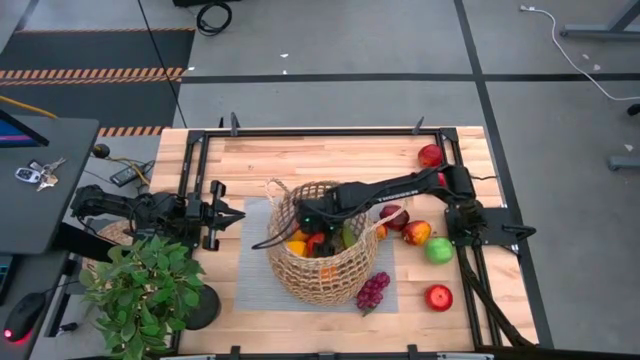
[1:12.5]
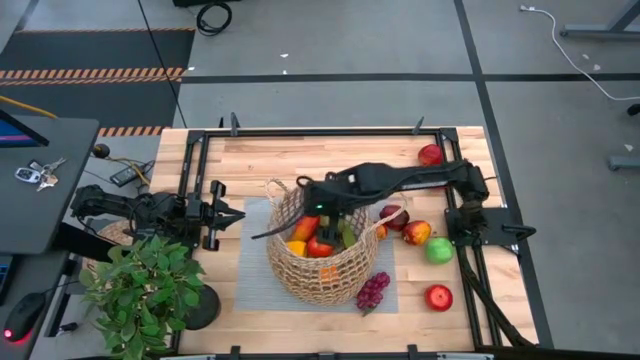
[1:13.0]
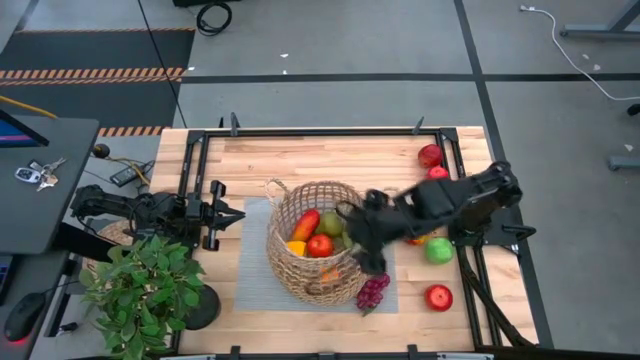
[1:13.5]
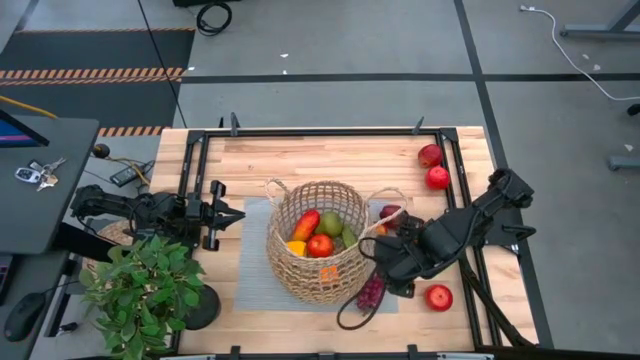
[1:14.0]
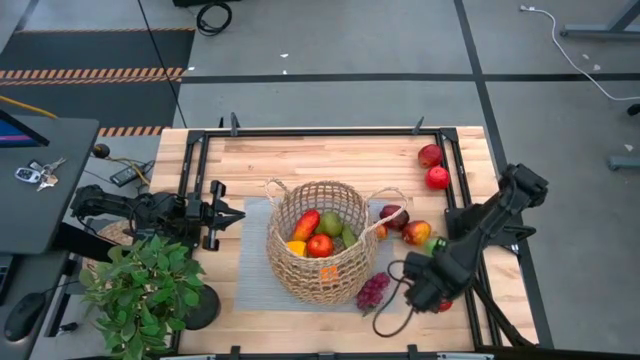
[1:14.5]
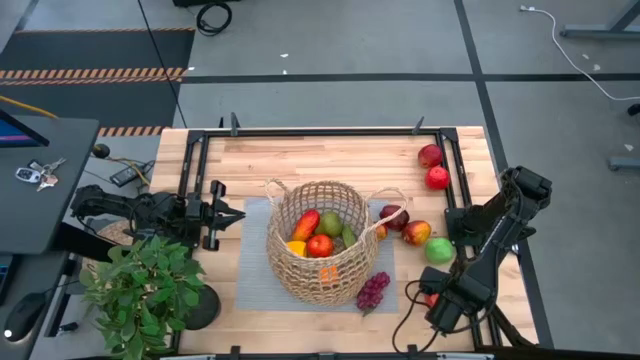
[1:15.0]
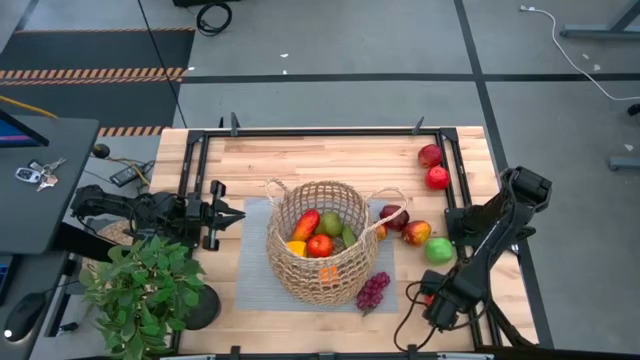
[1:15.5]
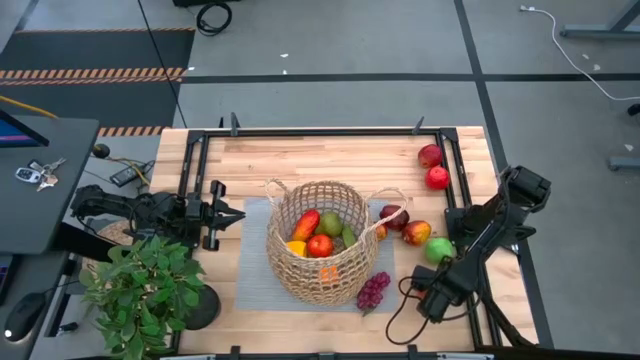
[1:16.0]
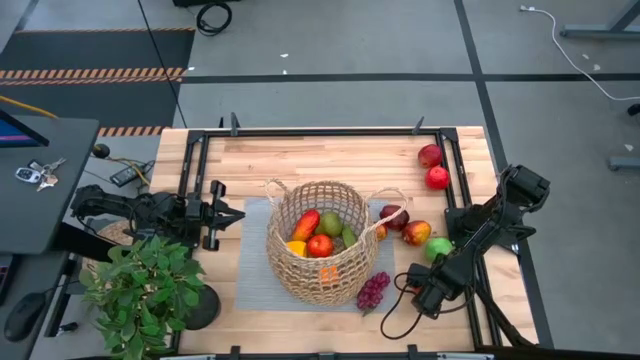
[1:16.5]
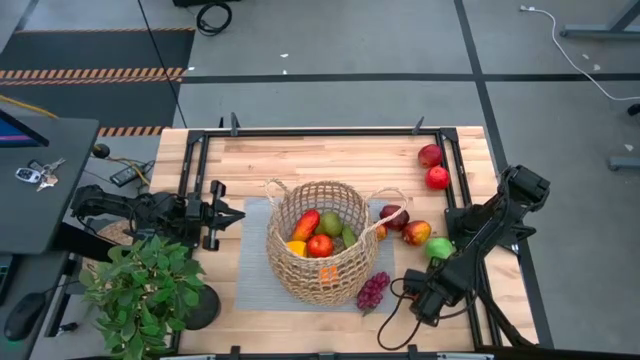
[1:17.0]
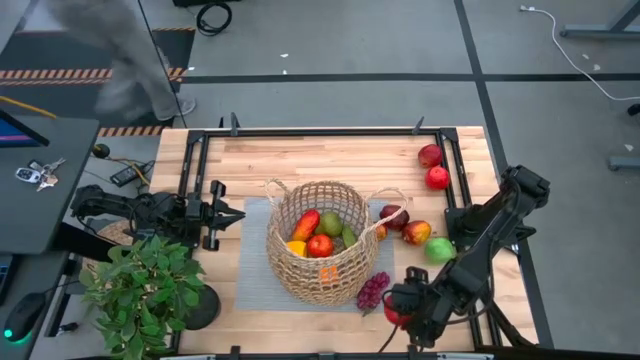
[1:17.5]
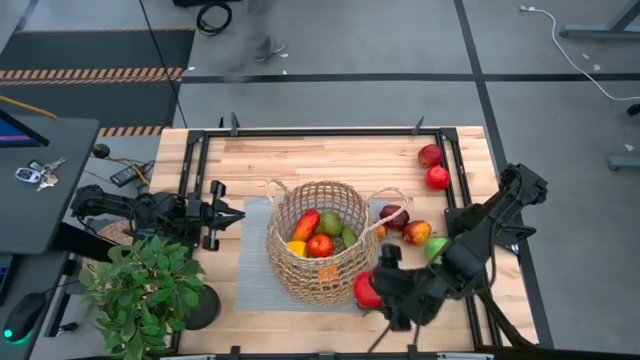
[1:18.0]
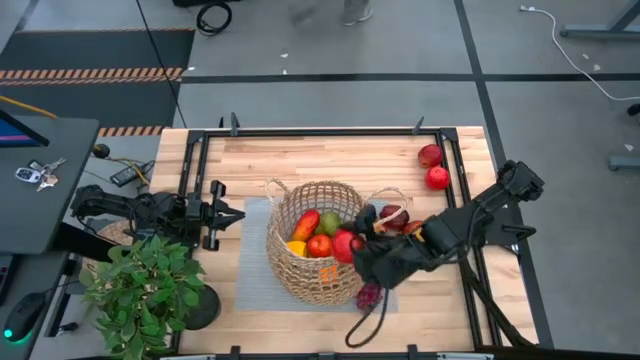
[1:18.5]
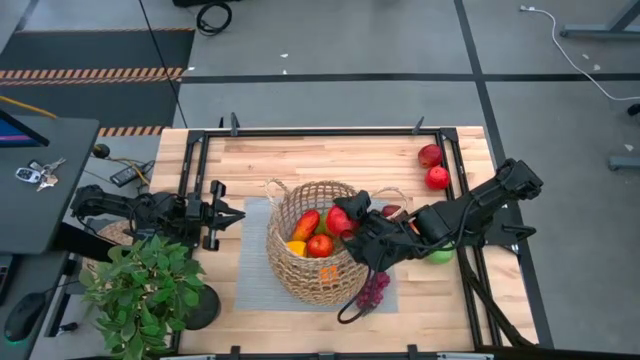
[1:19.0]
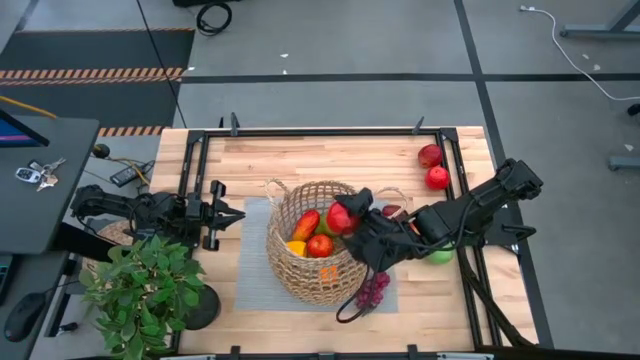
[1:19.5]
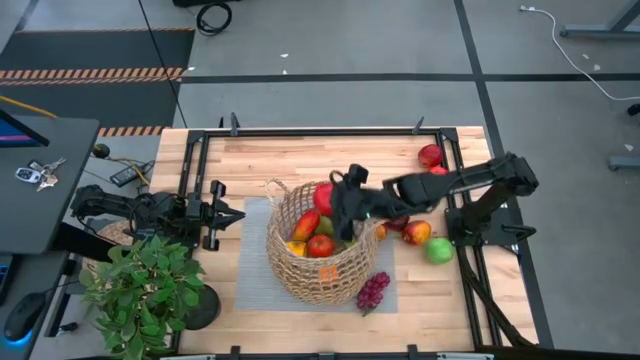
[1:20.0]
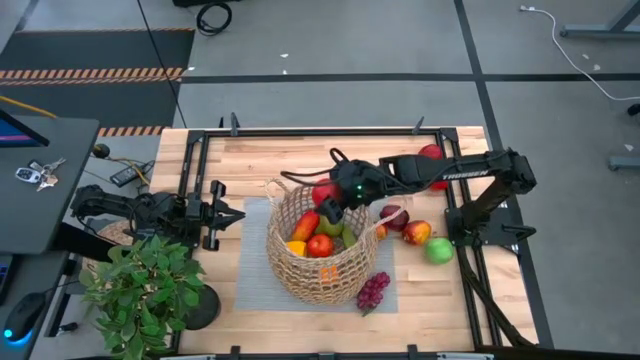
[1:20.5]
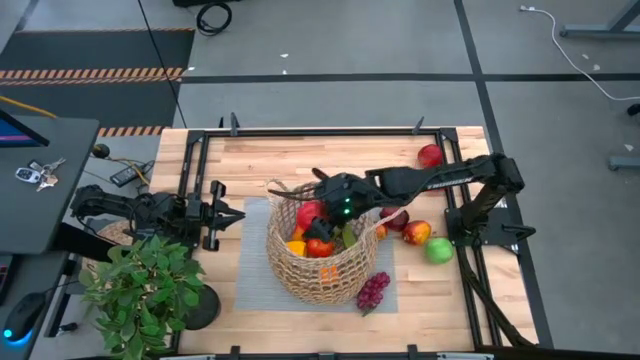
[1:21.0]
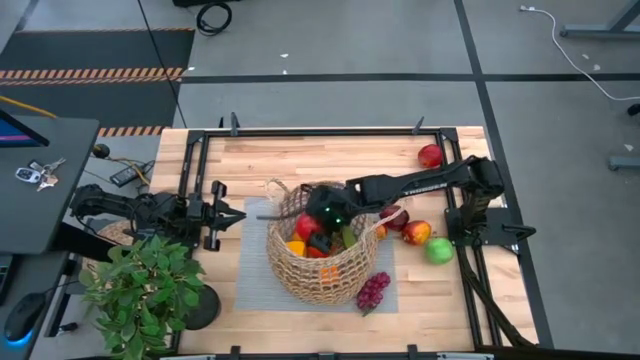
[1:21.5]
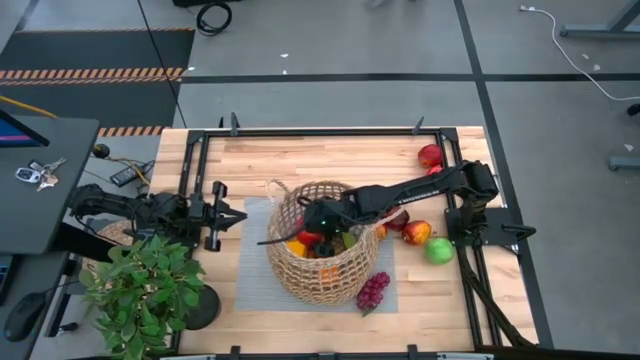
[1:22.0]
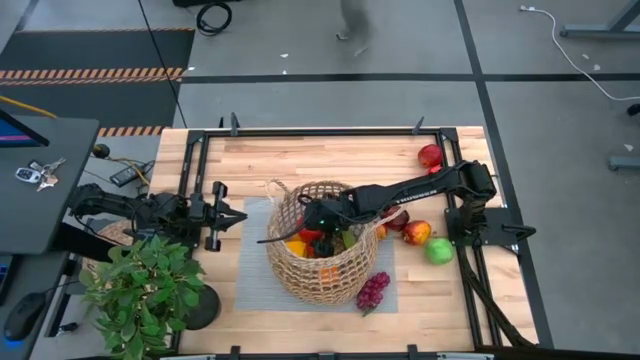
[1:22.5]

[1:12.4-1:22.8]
Task: Build produce basket
Put the bottom red apple into the brown basket

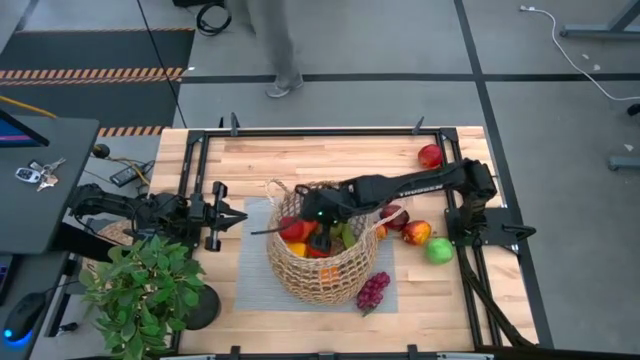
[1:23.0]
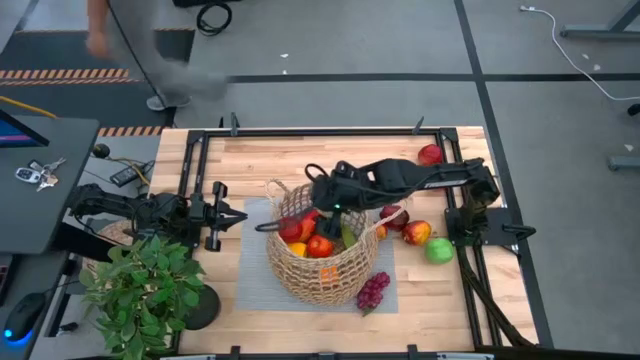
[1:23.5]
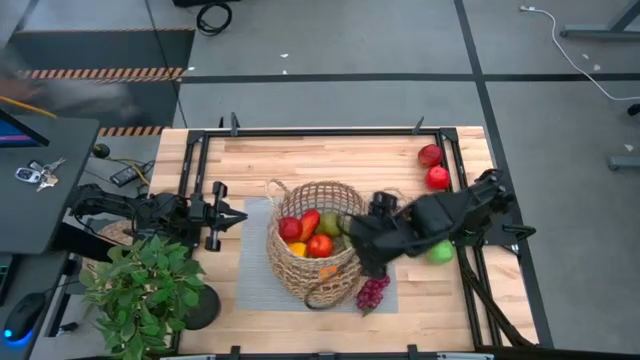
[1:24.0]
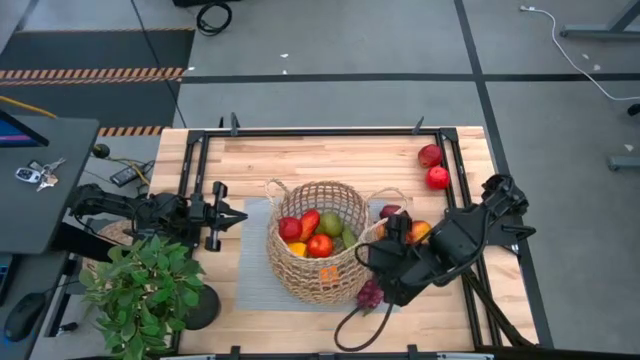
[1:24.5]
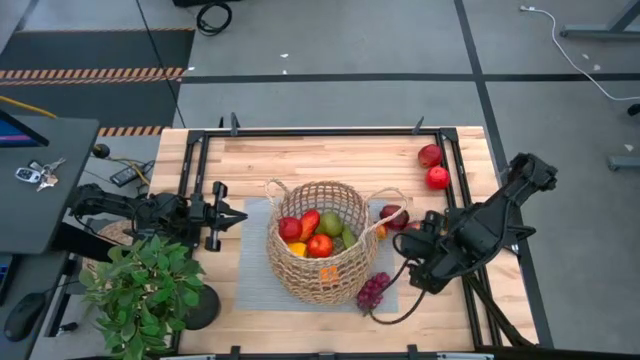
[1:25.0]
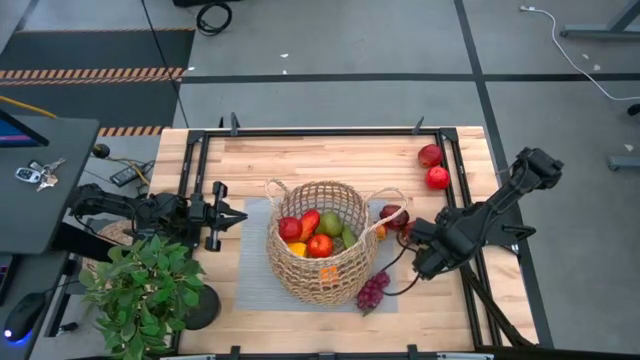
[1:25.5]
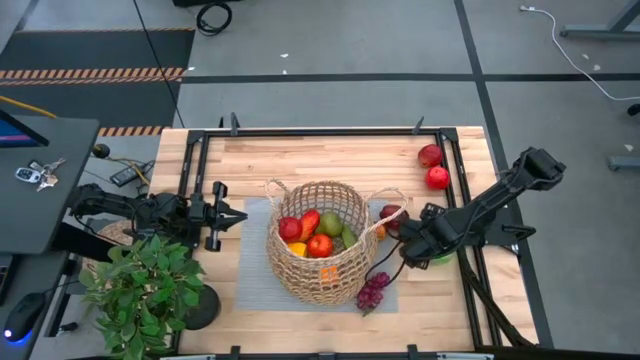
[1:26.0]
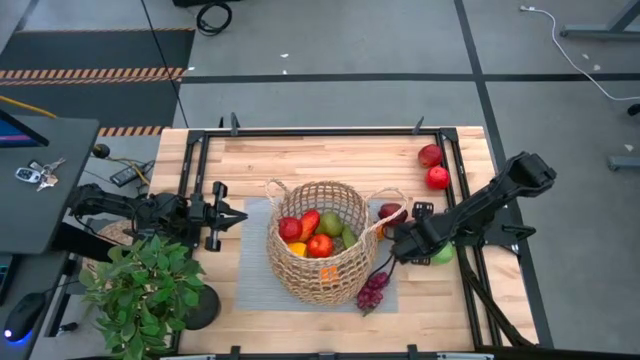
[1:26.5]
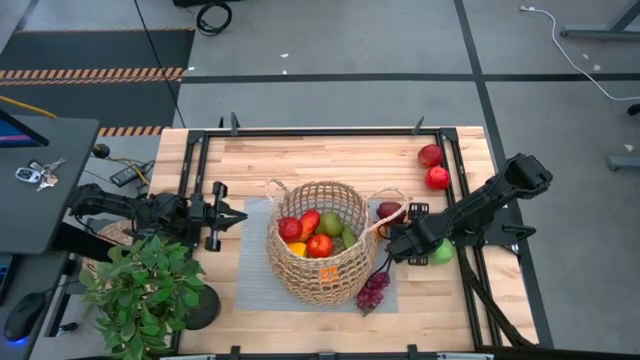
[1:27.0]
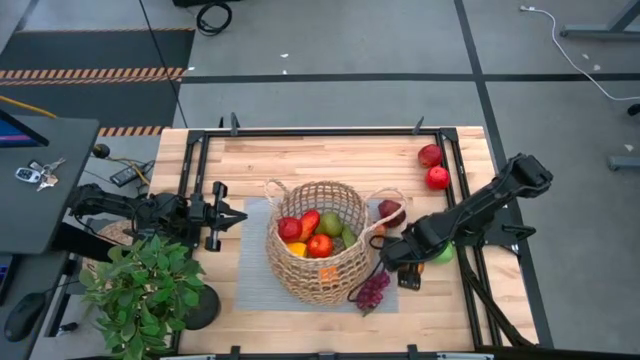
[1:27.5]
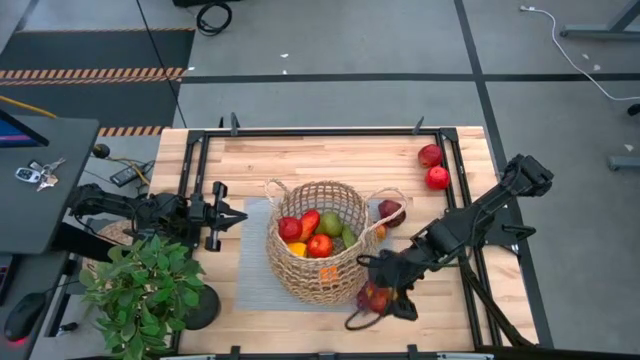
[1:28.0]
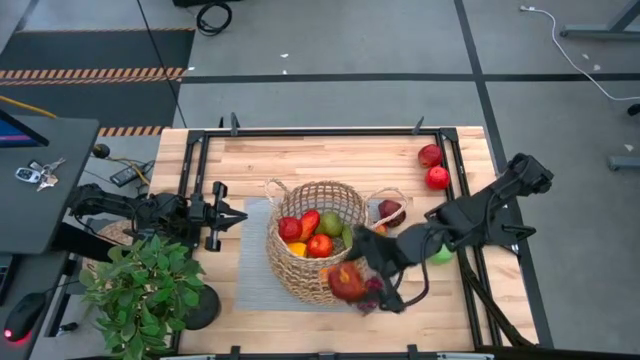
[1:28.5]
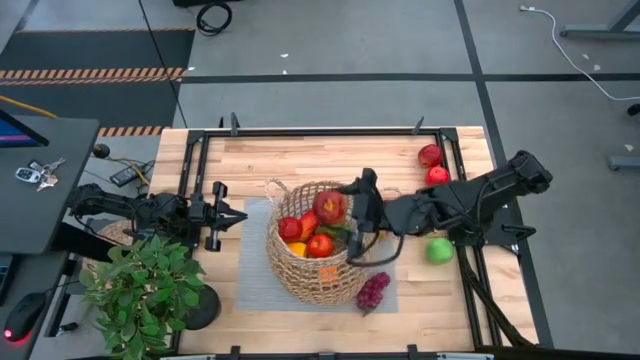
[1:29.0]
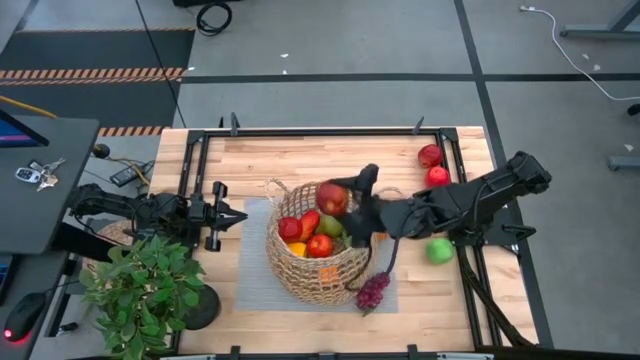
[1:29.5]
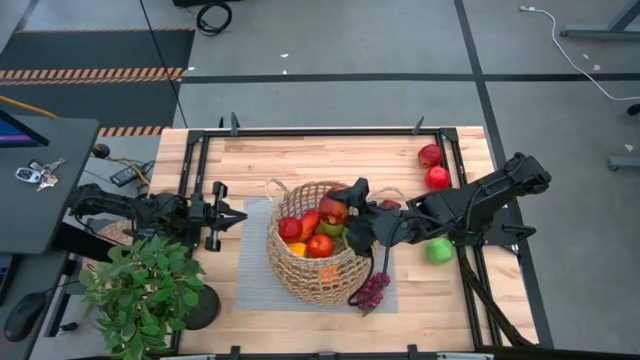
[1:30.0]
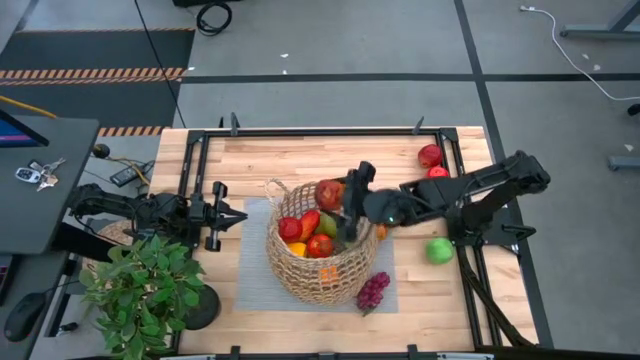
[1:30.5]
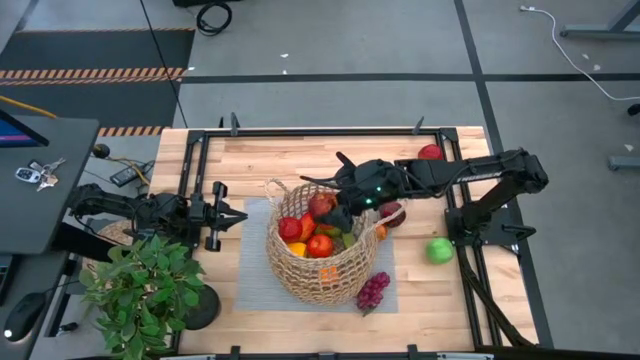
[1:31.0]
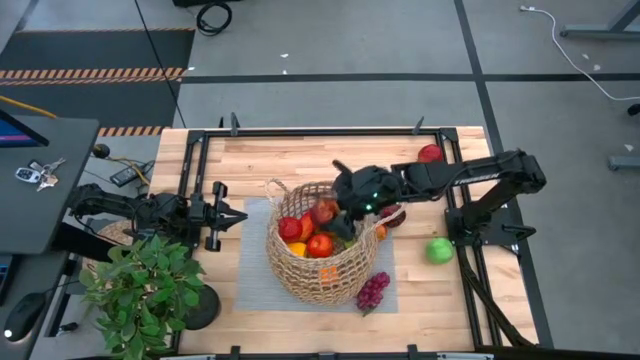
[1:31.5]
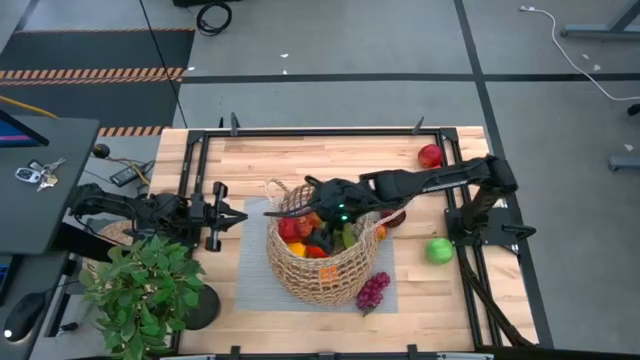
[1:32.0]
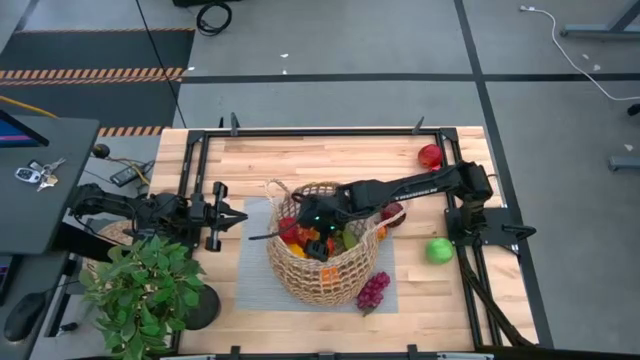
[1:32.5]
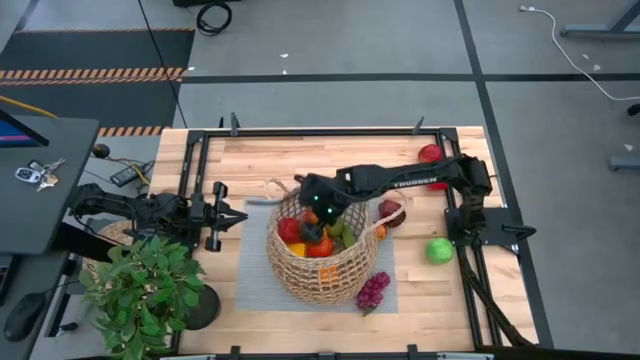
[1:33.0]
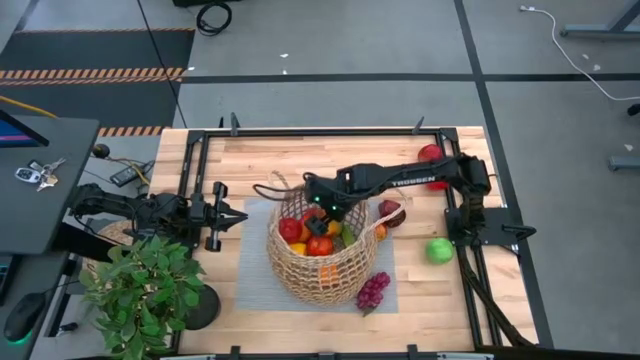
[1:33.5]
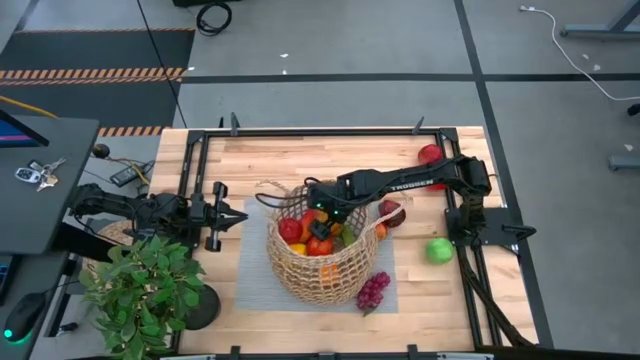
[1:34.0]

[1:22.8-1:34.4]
Put the bottom dark red apple into the brown basket
